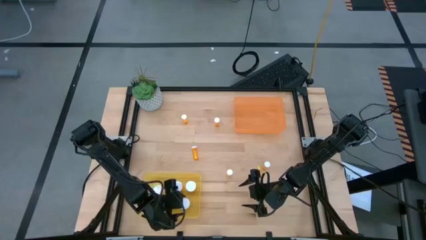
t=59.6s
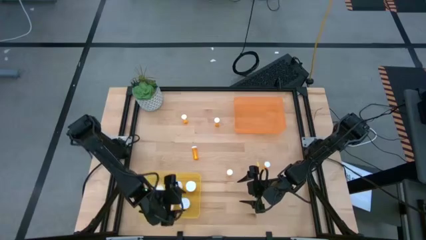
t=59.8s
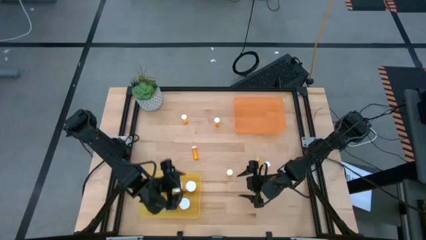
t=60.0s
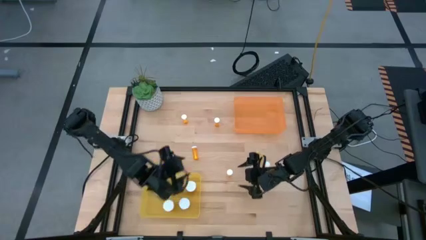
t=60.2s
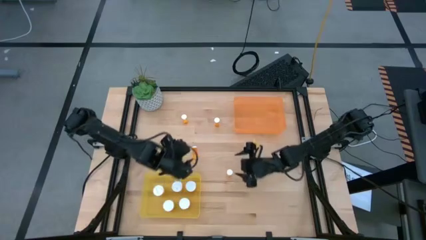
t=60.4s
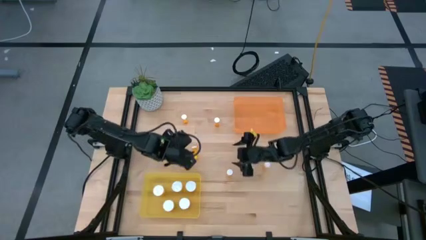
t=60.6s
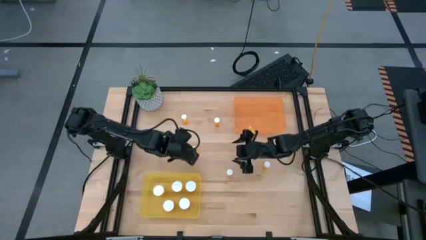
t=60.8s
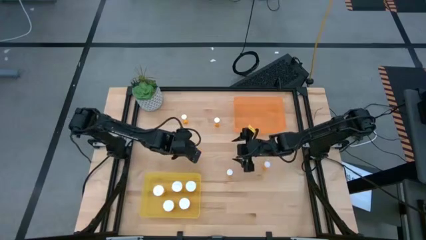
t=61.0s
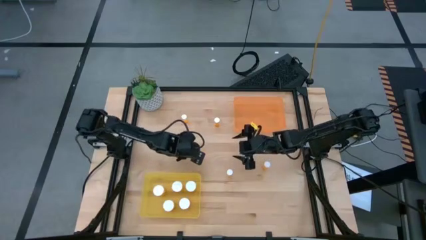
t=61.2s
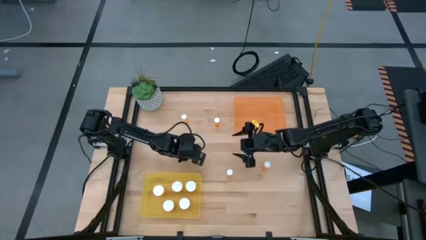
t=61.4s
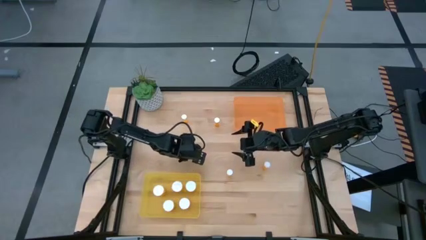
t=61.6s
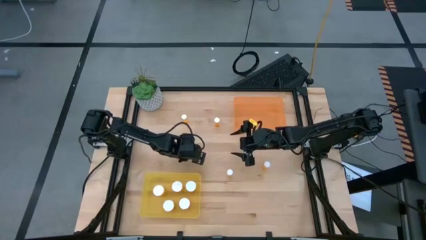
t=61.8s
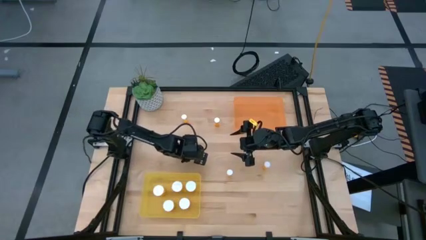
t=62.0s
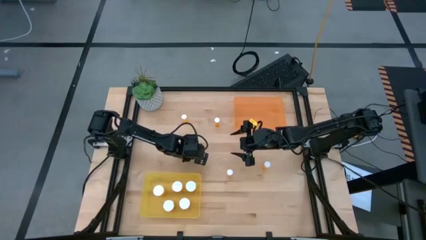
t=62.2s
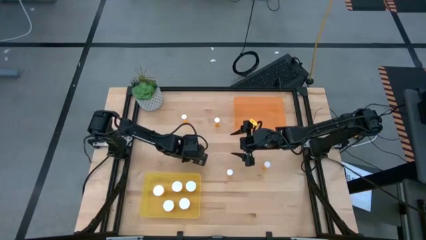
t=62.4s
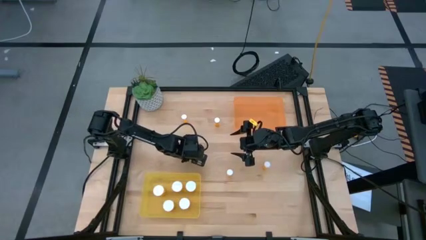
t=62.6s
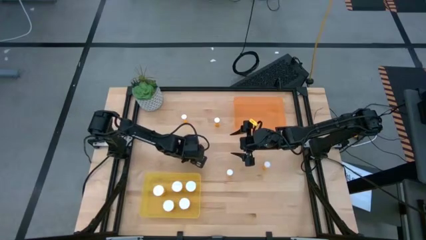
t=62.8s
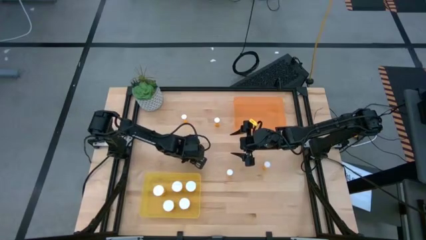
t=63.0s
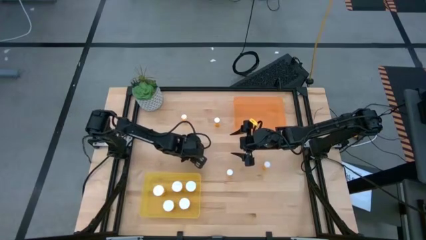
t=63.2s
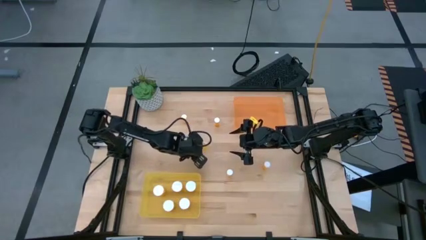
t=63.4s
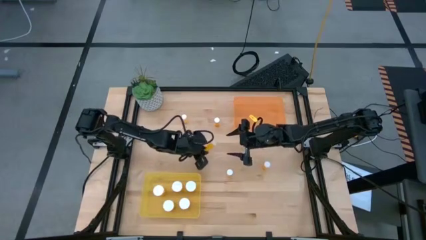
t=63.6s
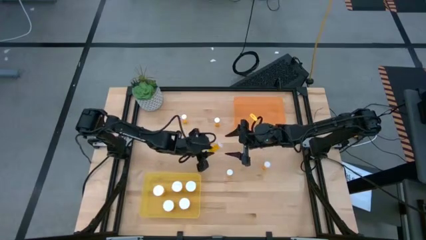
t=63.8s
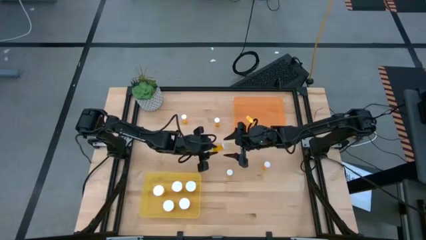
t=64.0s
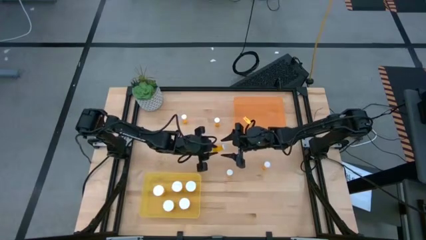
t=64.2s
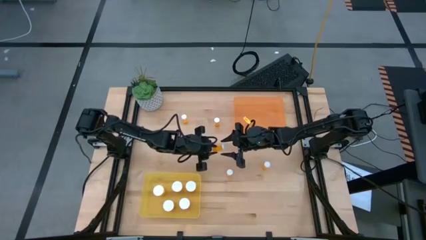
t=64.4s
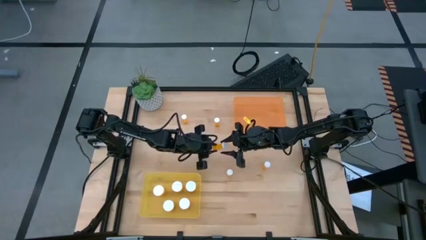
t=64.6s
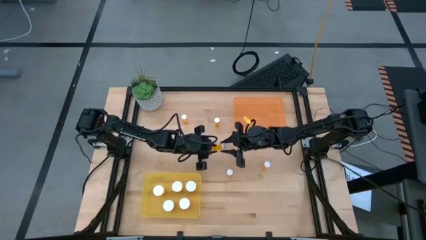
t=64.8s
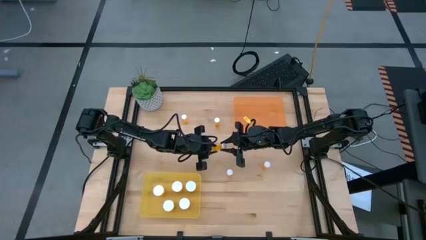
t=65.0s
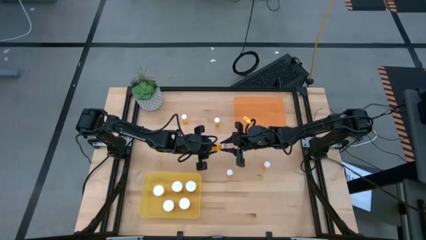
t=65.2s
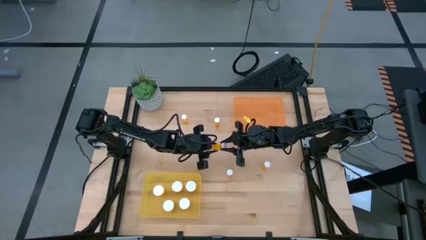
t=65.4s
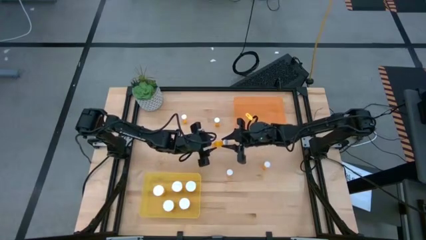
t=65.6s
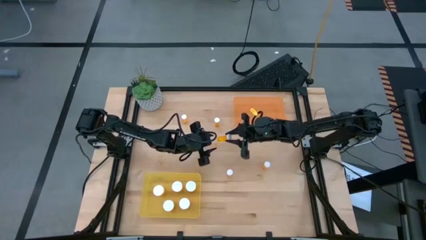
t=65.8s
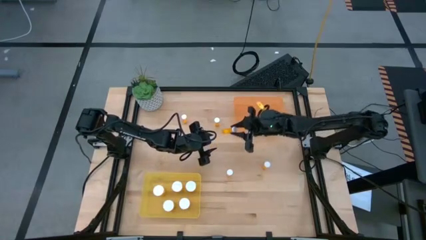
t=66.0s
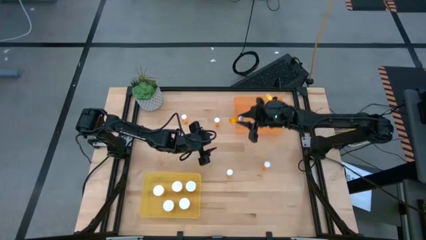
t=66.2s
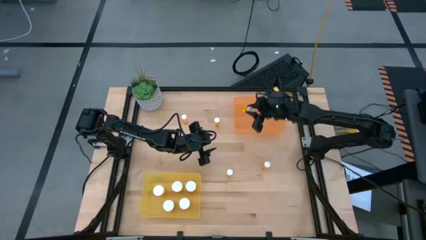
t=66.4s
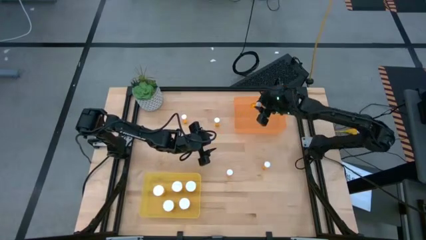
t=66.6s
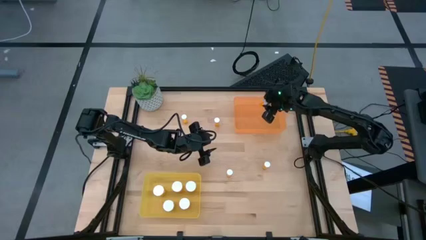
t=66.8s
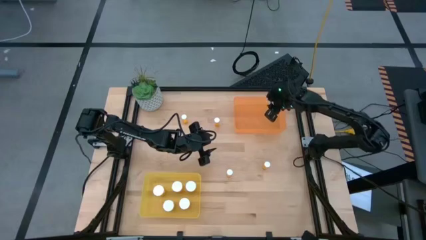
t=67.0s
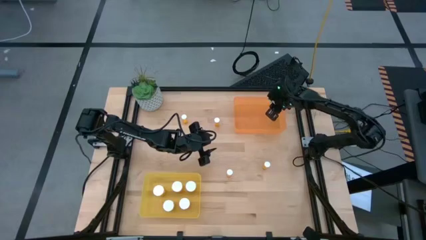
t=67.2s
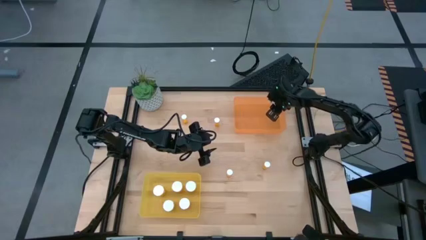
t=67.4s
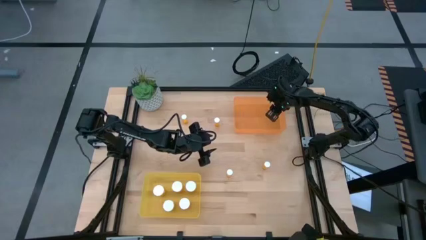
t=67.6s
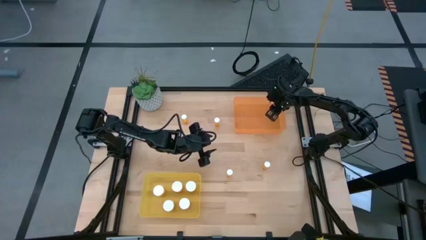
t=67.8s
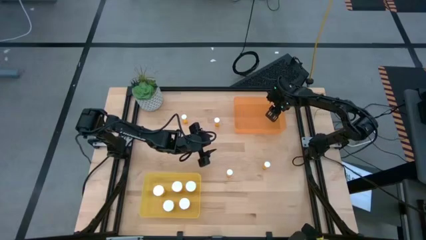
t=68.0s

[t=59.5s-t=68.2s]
Task: Pick and place medicine bottles into bin by pill shape (circle, oval)
Put the small pill bottle into the orange bin

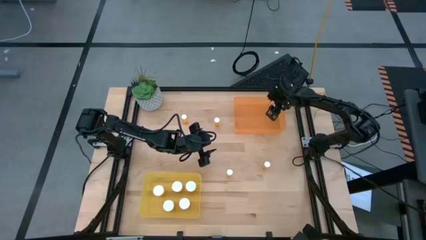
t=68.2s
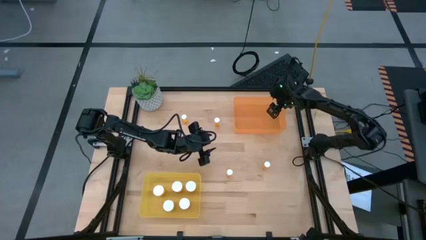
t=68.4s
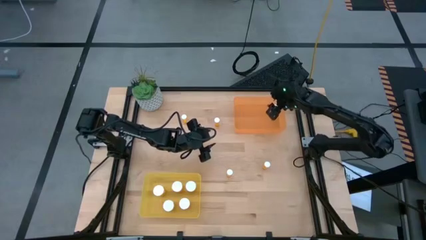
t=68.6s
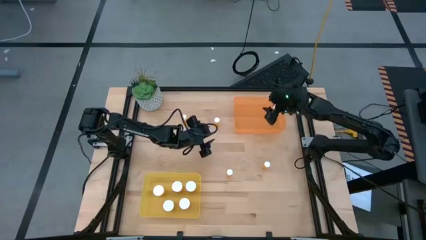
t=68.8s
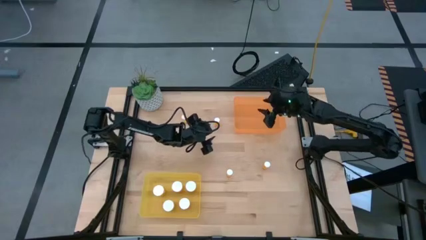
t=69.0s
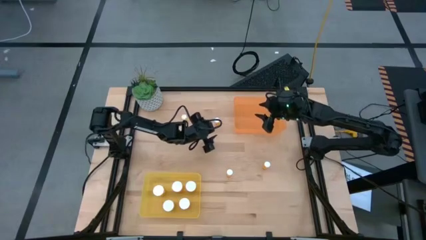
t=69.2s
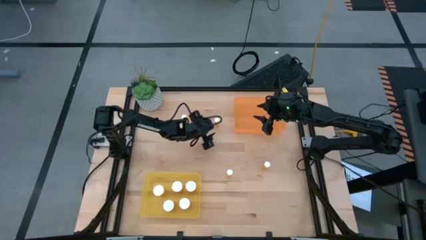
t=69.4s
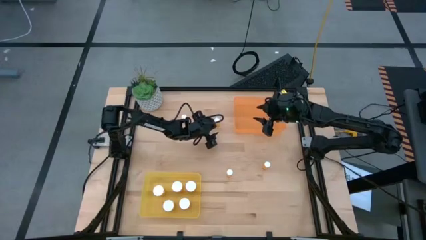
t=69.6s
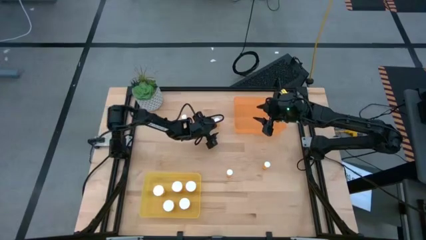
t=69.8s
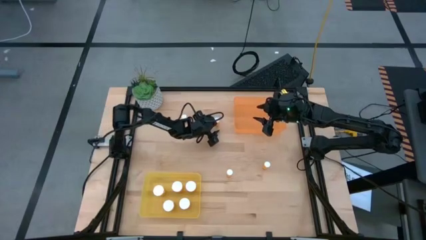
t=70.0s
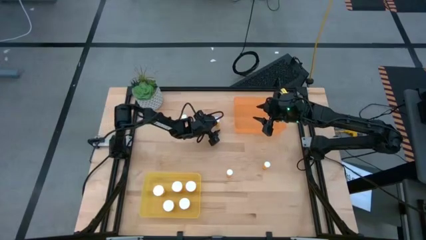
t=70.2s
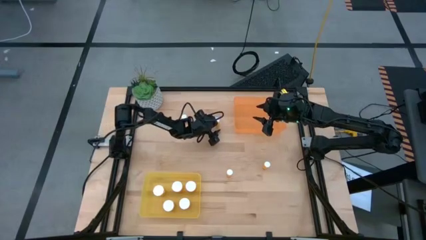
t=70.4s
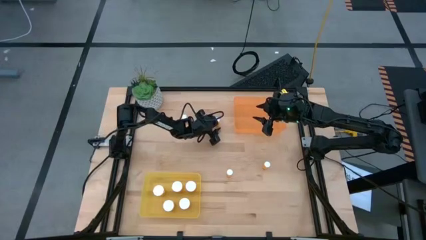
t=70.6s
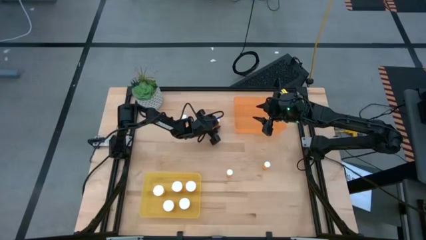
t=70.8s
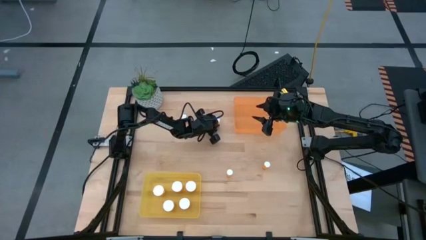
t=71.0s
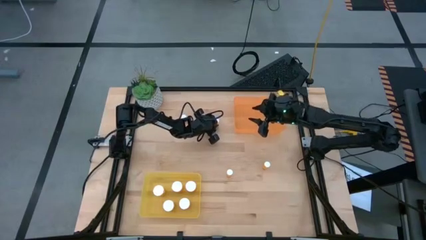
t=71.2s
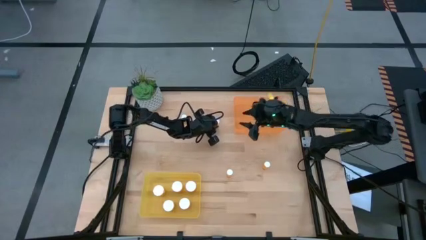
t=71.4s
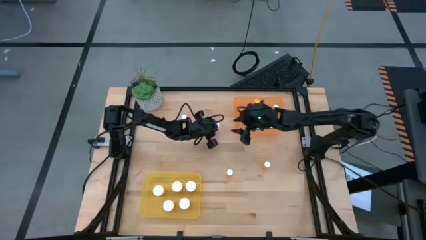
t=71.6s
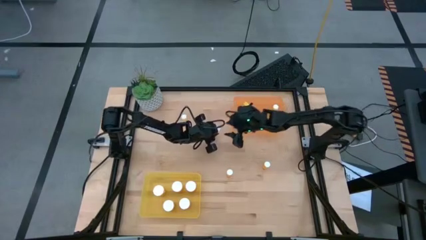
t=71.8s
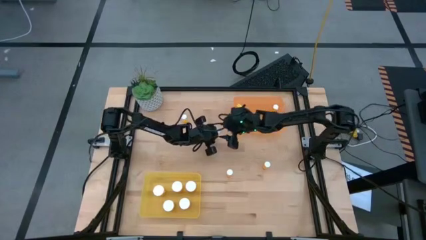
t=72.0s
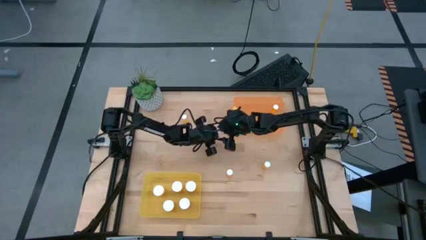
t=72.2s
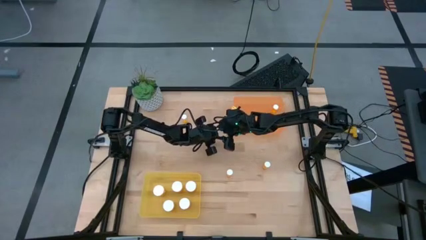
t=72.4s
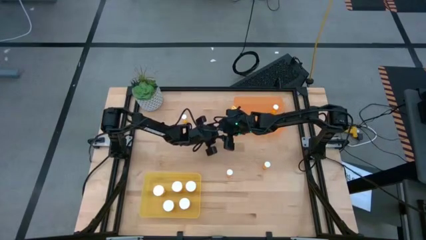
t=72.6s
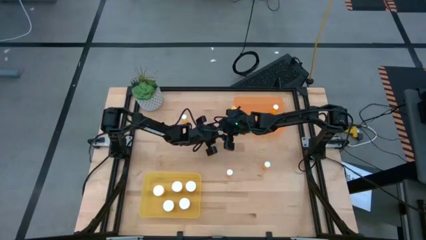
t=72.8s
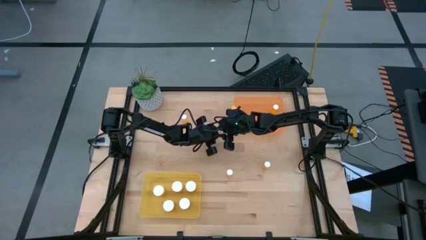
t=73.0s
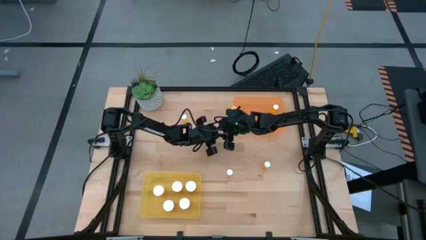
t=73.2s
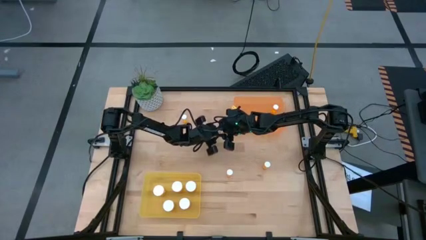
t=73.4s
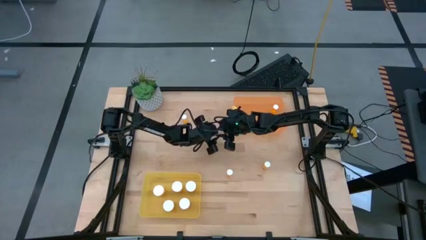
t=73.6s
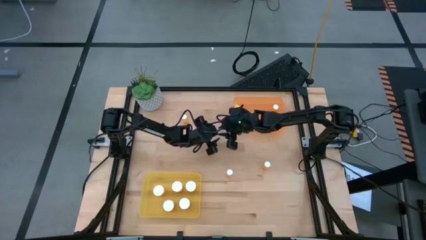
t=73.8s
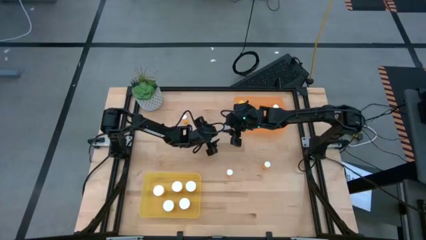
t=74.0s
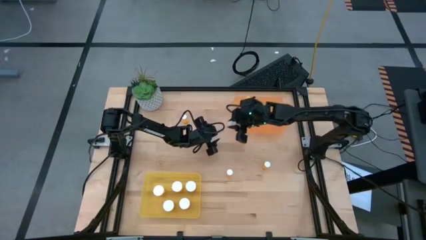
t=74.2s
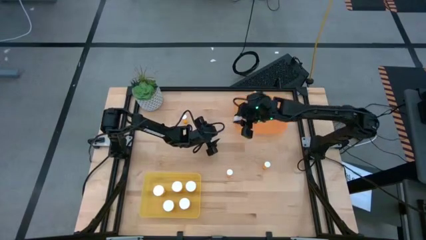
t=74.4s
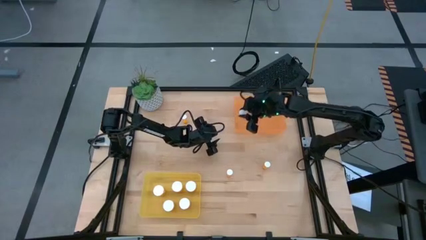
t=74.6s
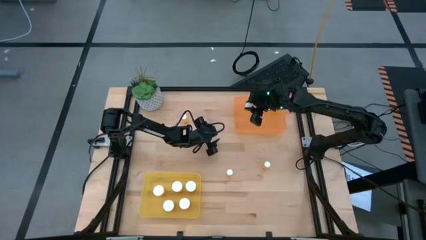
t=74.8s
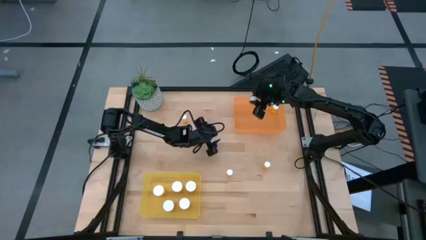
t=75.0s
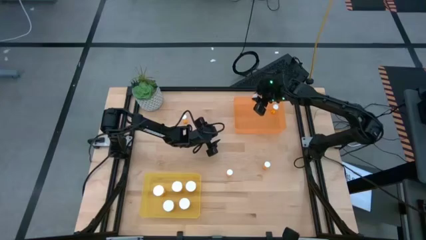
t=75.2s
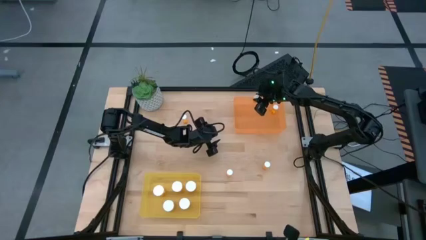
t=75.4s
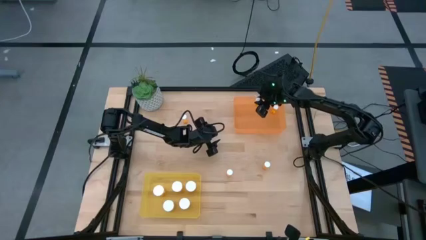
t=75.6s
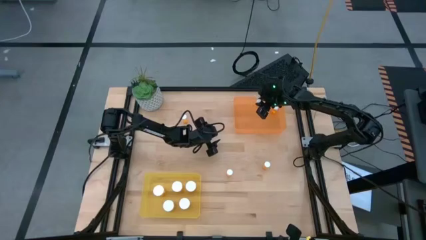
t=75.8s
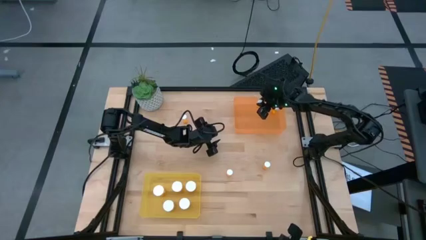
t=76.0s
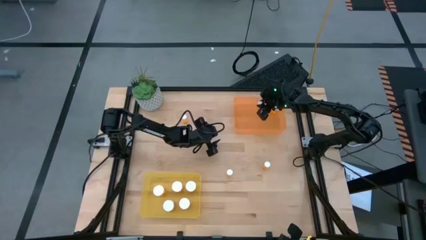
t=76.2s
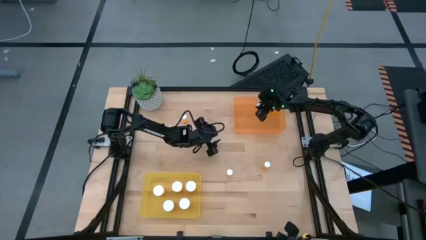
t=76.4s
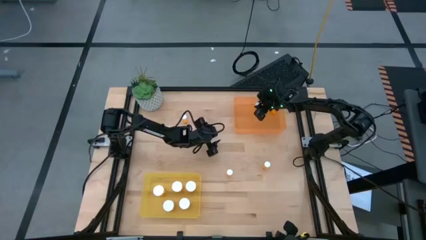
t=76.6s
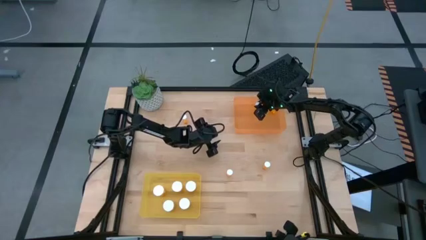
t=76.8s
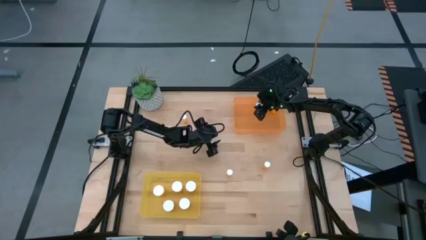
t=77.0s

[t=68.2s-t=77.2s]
Put the small pill bottle into the orange bin
